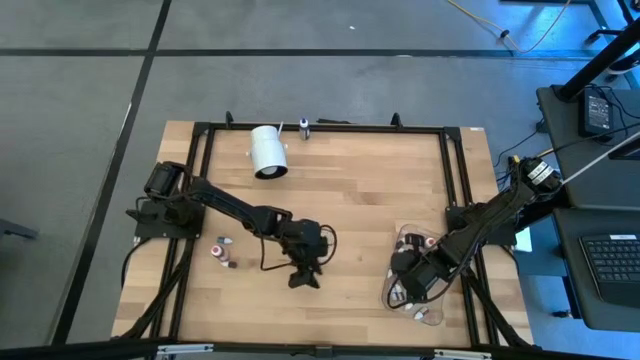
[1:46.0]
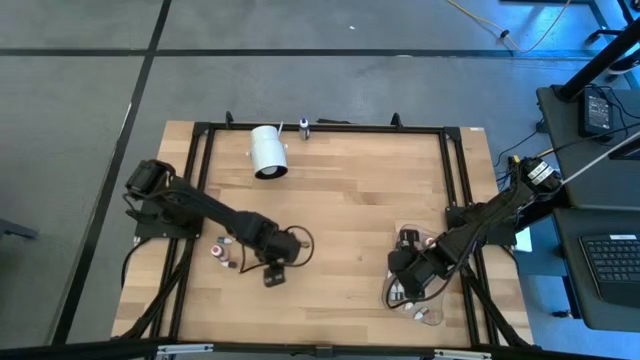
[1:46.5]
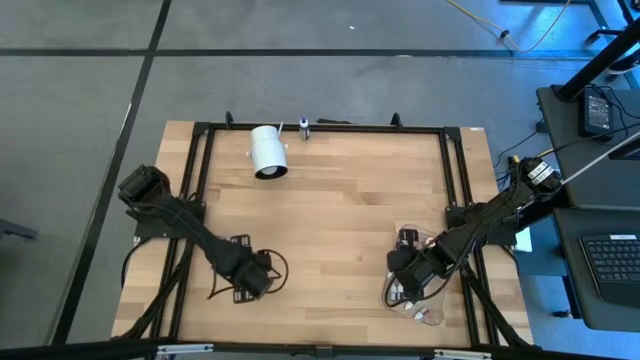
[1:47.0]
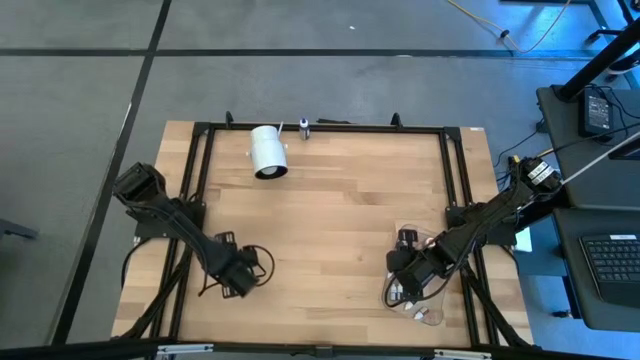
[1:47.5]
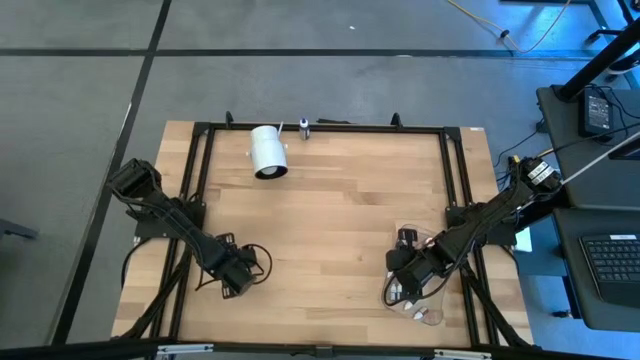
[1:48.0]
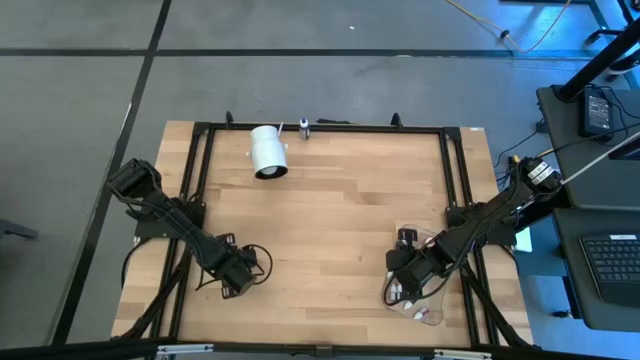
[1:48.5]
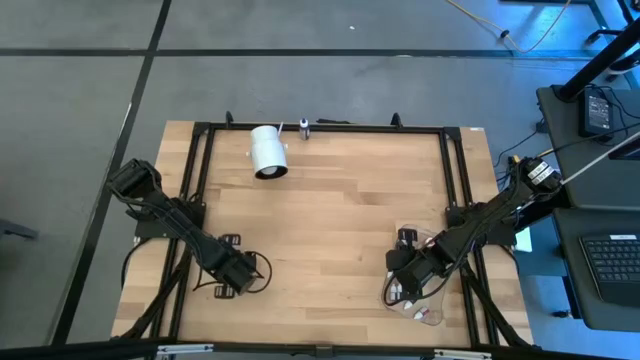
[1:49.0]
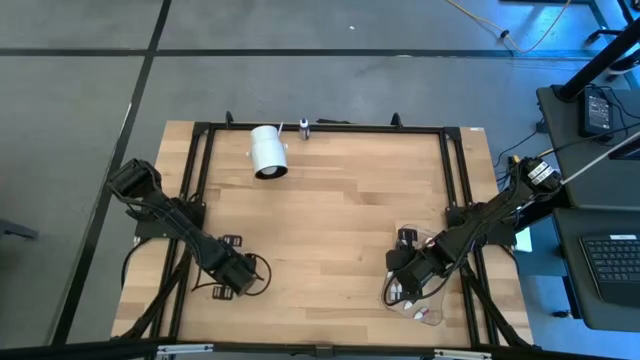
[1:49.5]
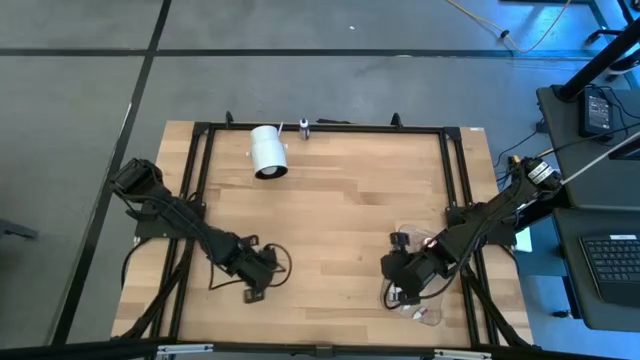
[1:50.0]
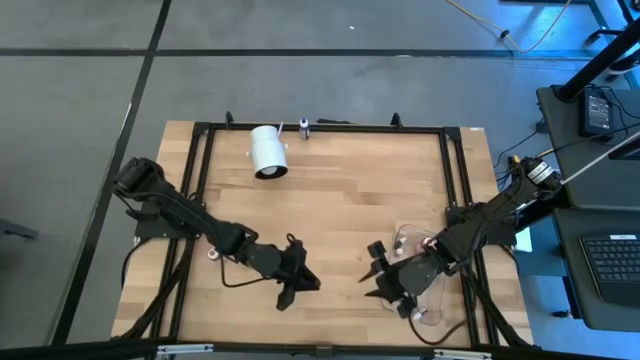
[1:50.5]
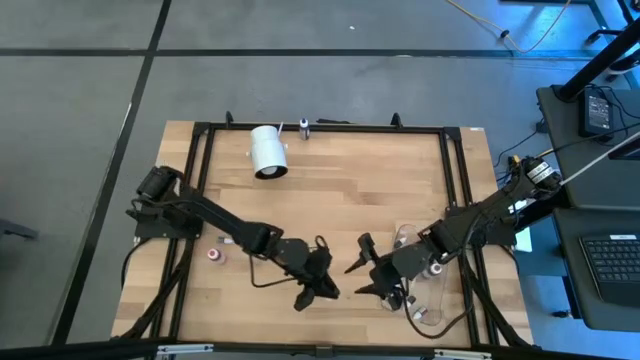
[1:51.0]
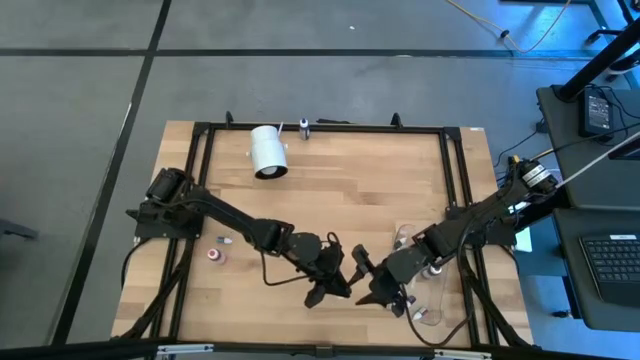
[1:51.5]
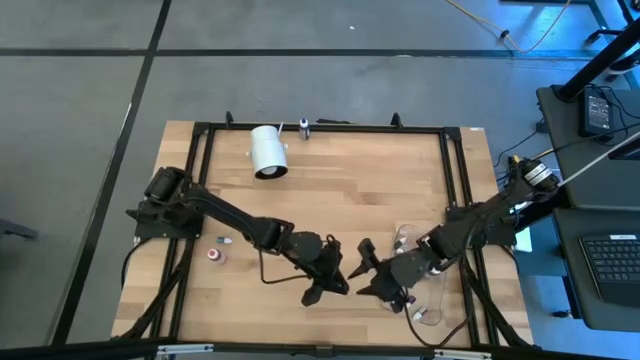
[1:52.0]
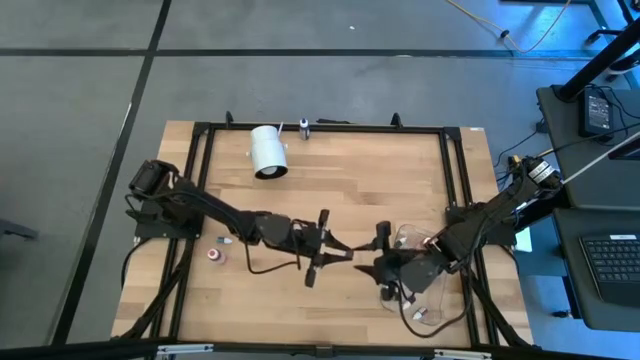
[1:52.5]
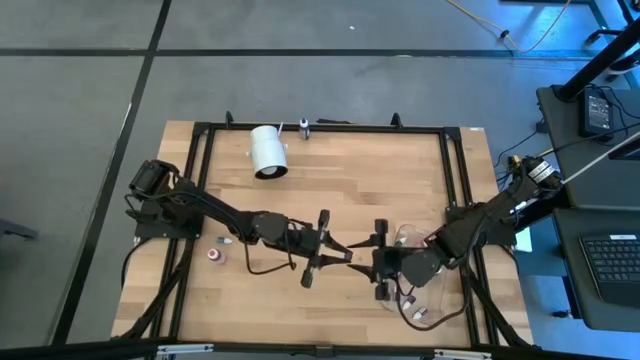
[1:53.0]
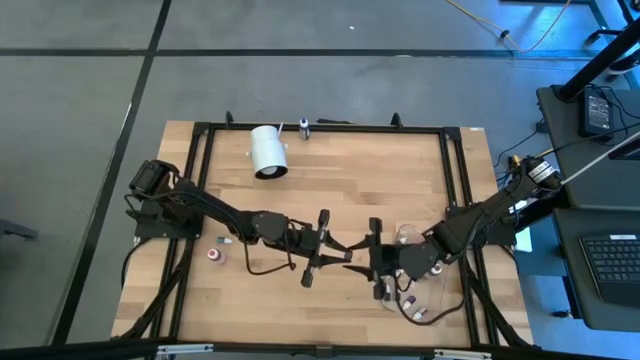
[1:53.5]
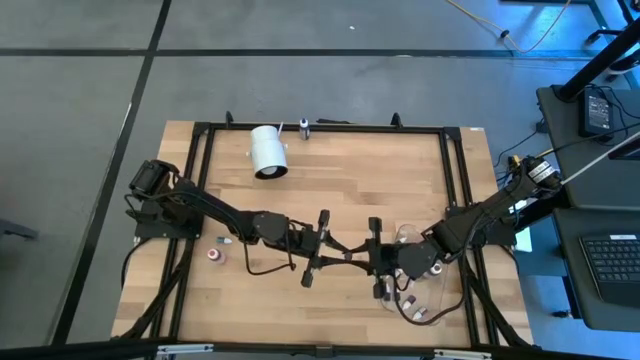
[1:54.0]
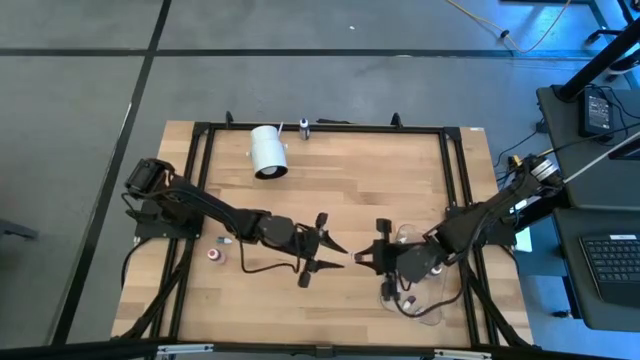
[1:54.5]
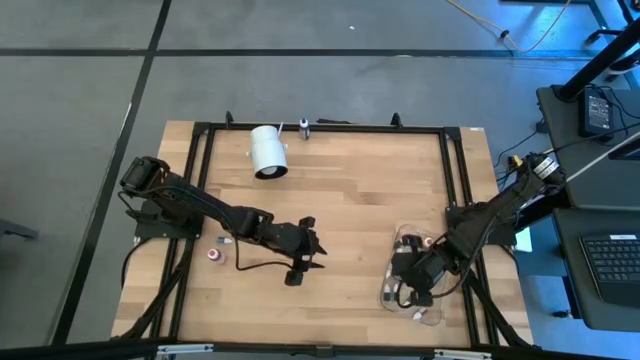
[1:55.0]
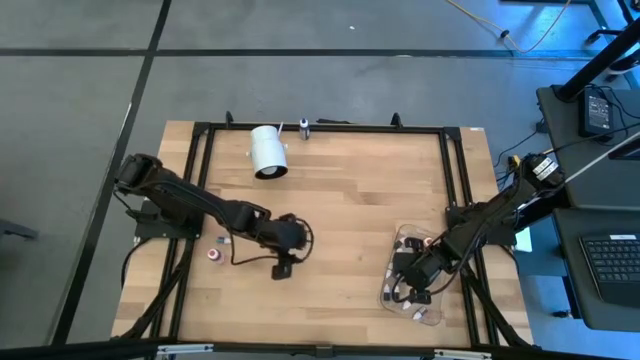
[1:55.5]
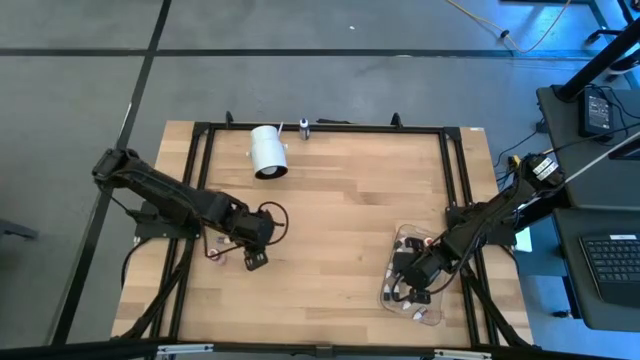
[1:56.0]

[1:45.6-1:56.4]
Task: Pick & Place food coloring
Put the small pink food coloring bottle into the transparent bin

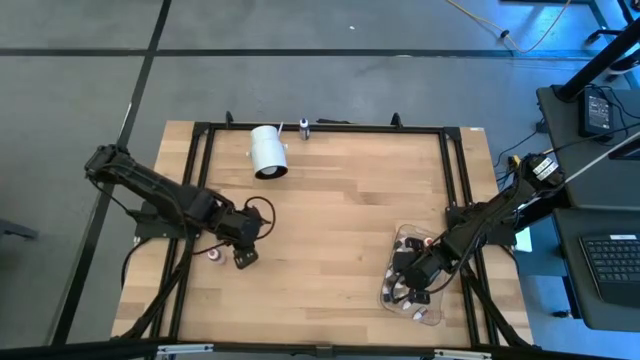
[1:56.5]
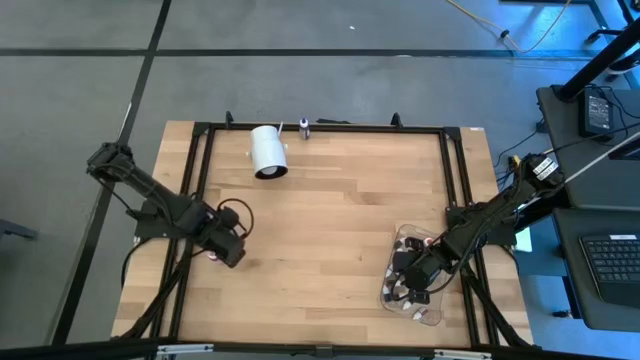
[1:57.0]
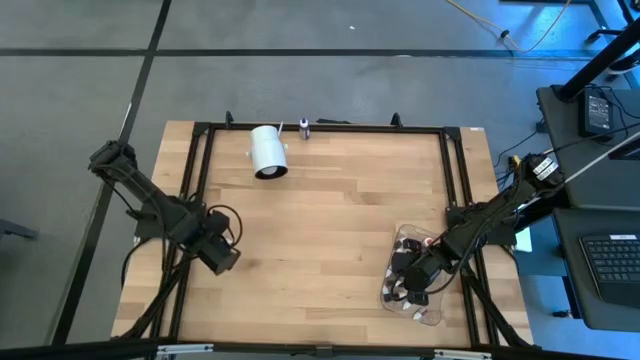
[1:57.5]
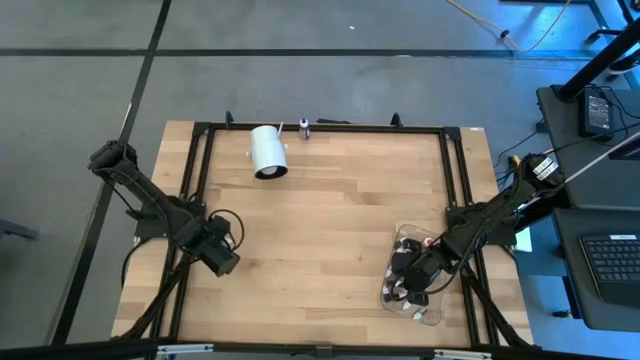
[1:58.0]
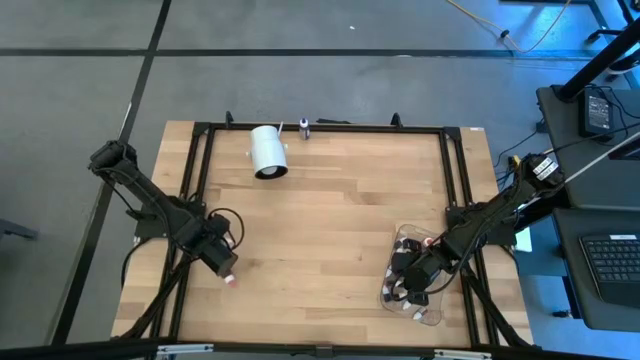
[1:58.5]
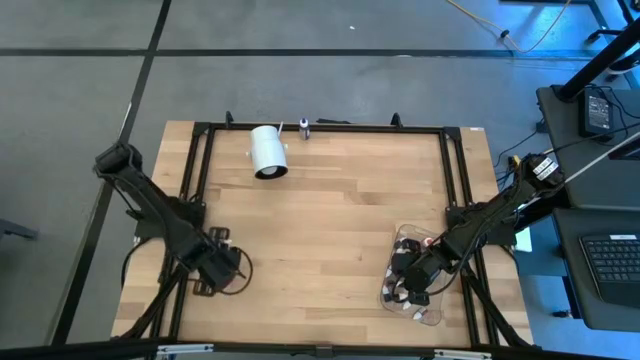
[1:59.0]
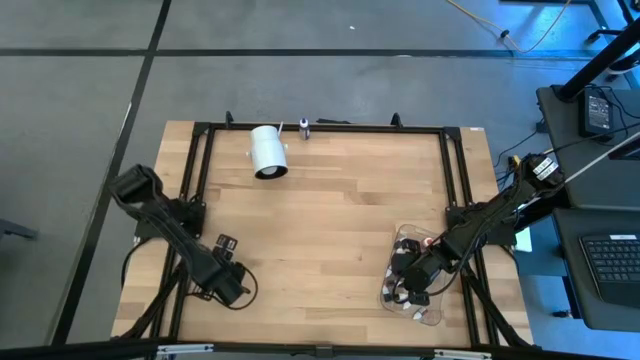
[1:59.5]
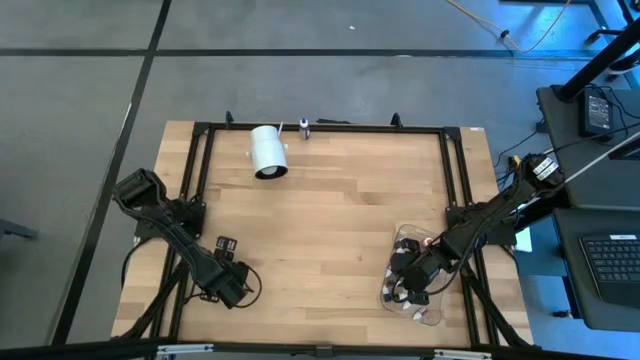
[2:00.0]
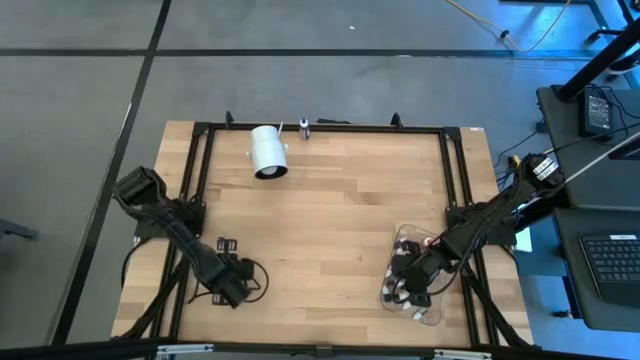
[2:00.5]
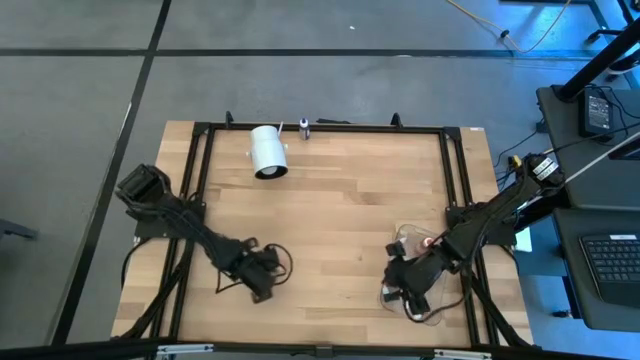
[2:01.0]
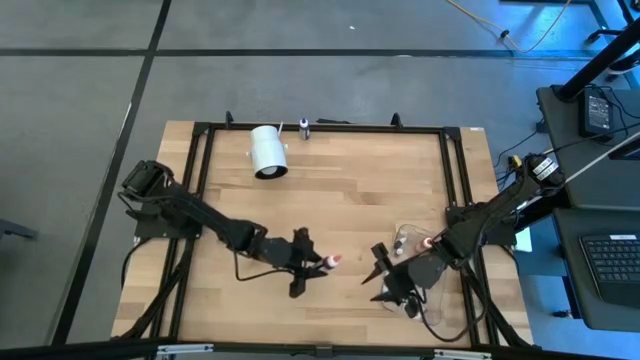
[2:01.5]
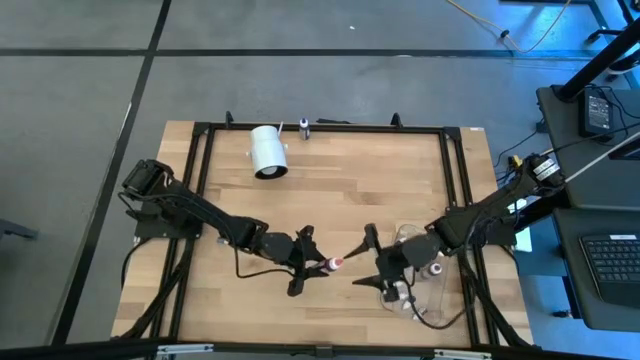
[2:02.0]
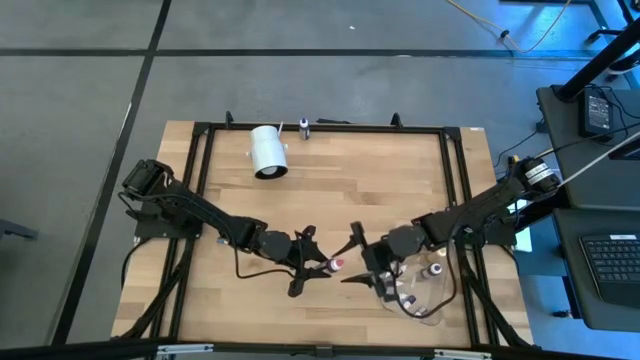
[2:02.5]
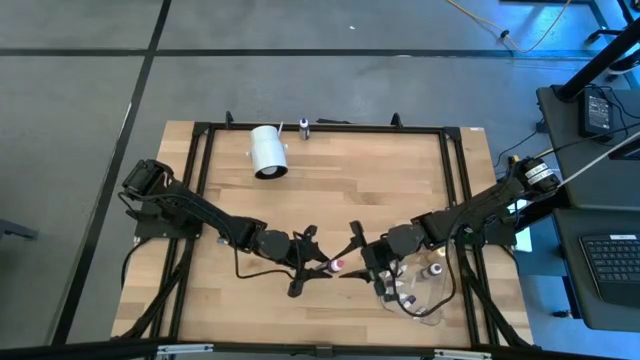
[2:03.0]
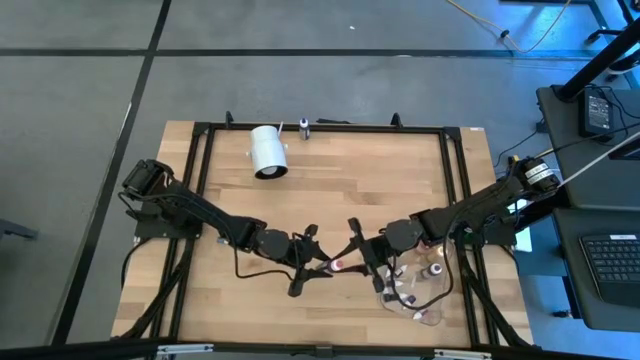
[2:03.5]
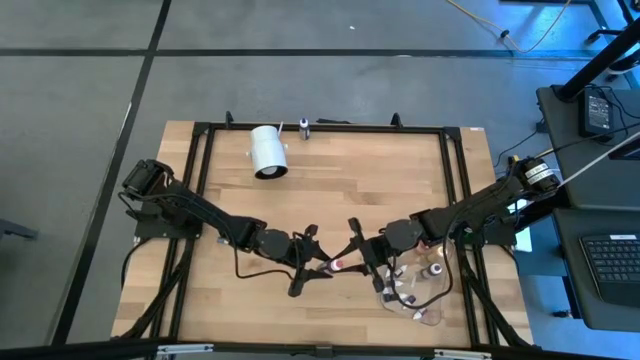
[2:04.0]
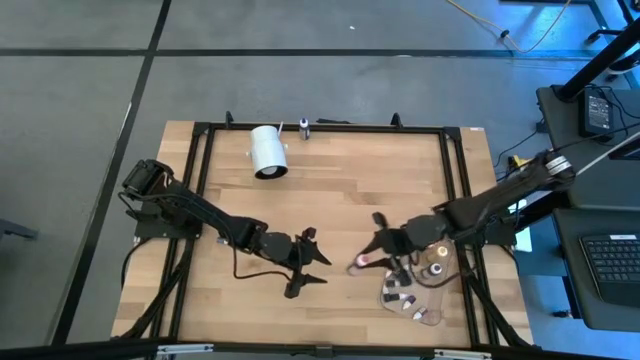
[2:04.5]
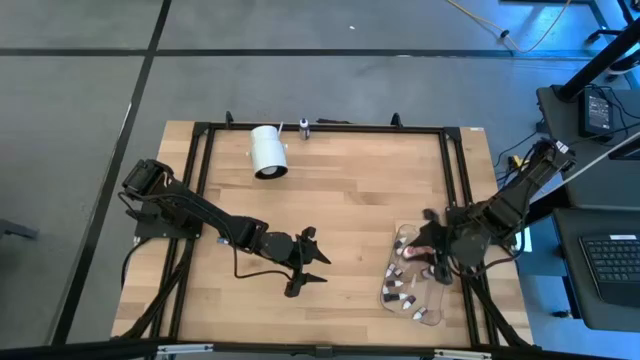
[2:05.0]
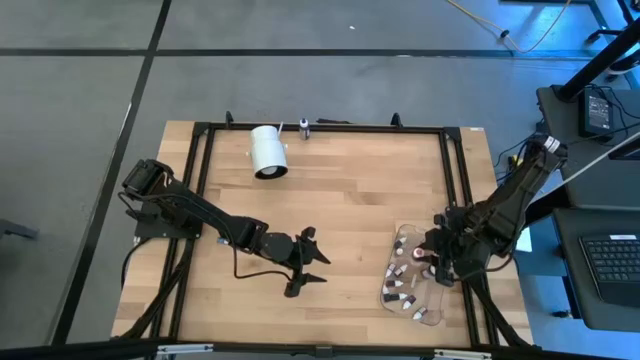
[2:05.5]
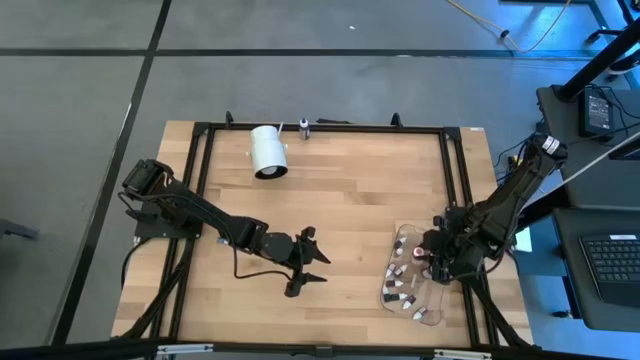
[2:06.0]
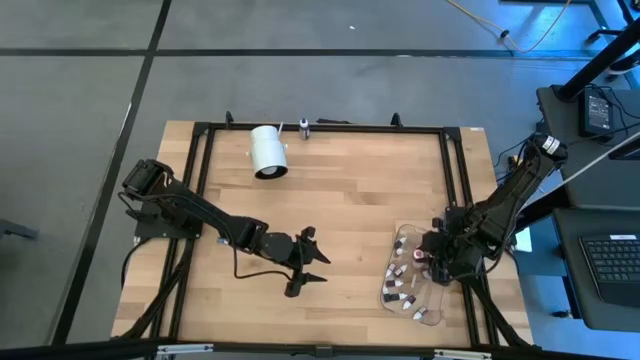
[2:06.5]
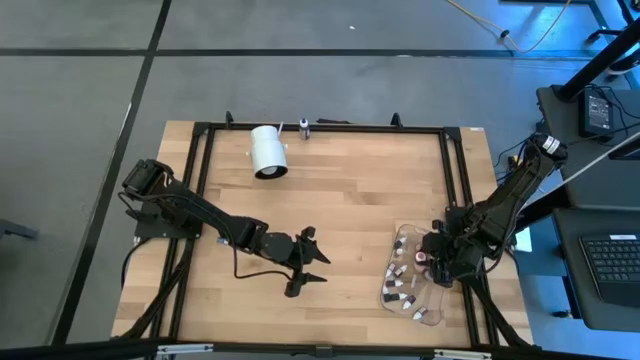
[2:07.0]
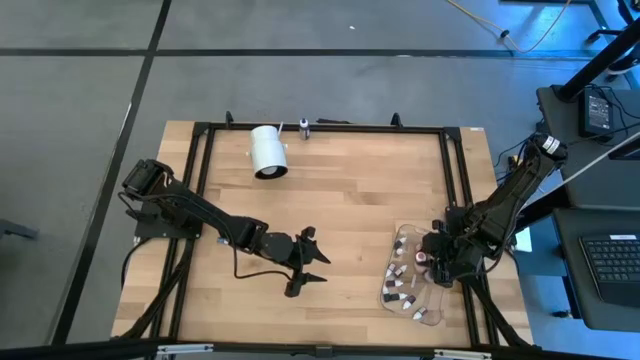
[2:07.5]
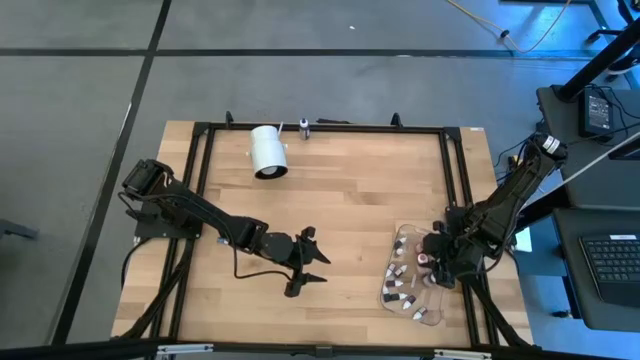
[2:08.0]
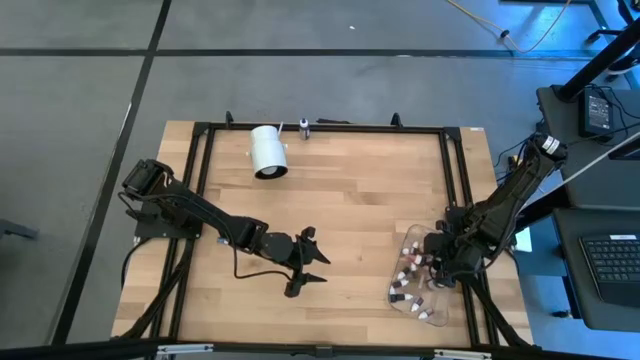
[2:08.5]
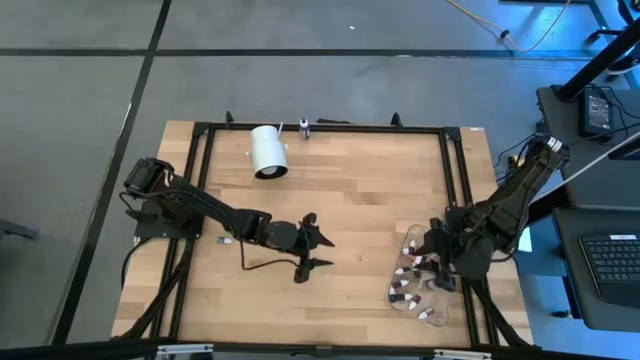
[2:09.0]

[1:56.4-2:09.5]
Put the large pink food coloring bottle into the transparent bin
